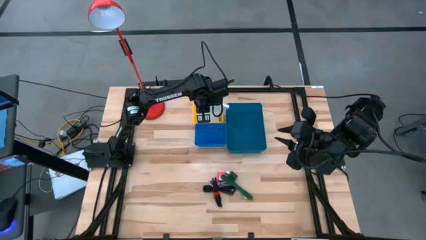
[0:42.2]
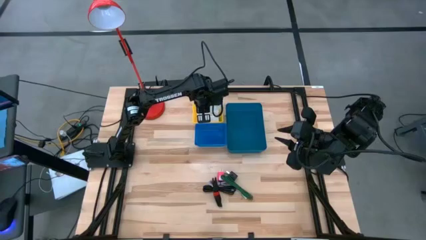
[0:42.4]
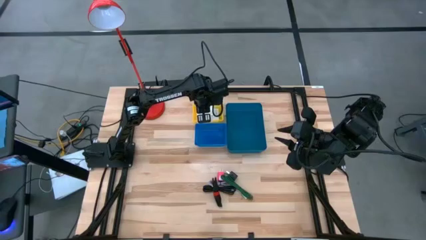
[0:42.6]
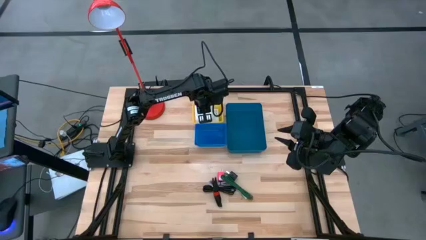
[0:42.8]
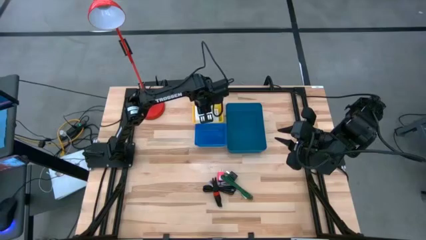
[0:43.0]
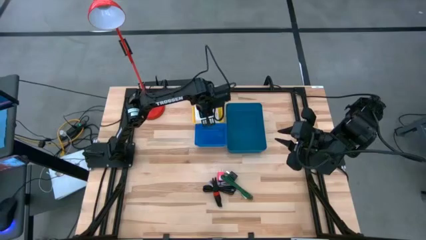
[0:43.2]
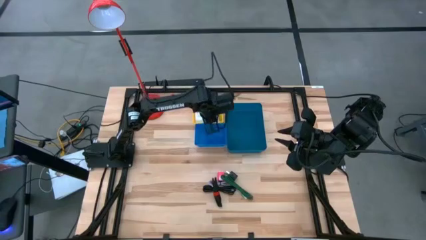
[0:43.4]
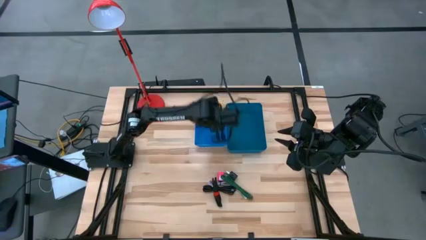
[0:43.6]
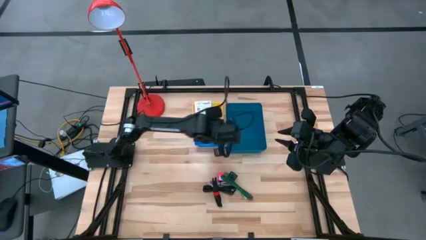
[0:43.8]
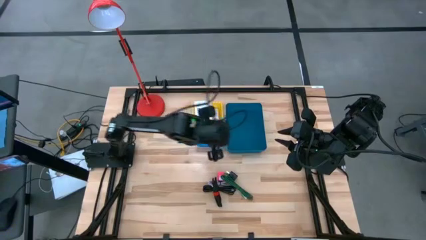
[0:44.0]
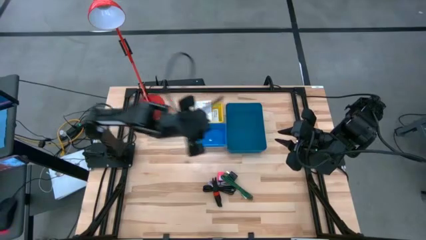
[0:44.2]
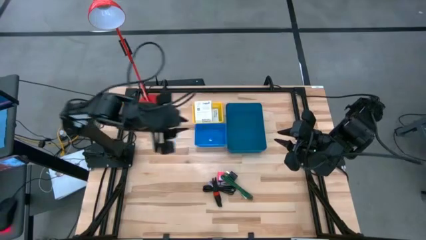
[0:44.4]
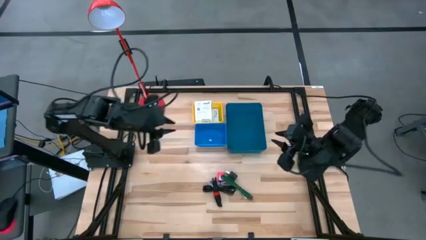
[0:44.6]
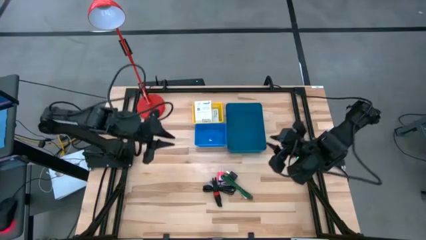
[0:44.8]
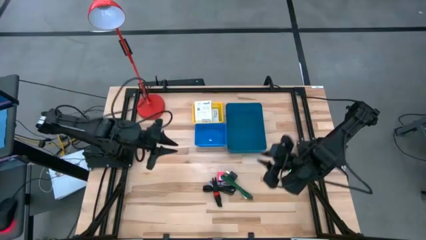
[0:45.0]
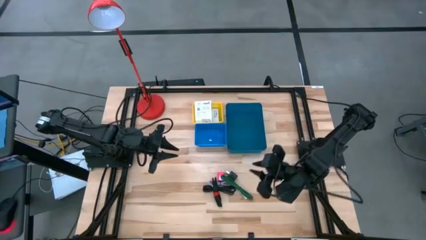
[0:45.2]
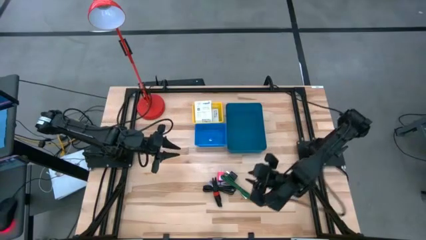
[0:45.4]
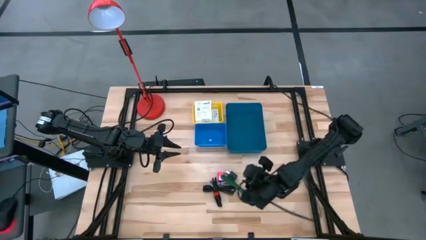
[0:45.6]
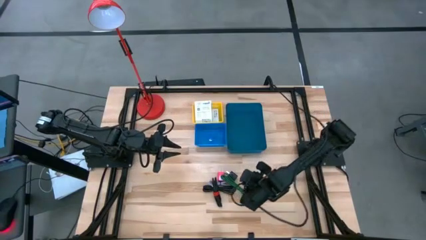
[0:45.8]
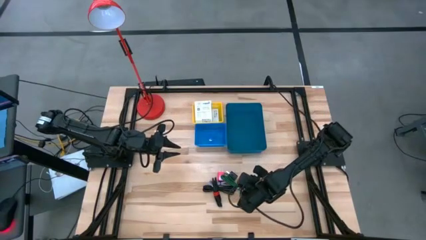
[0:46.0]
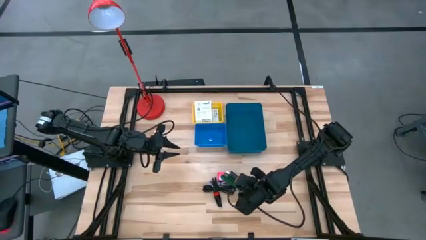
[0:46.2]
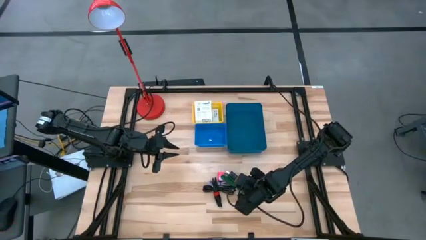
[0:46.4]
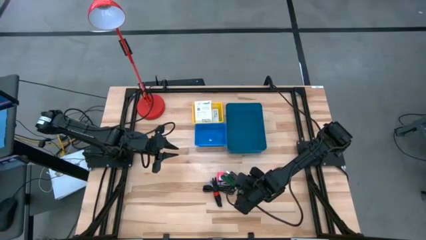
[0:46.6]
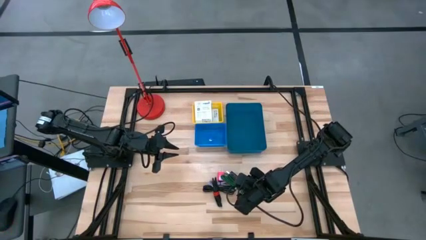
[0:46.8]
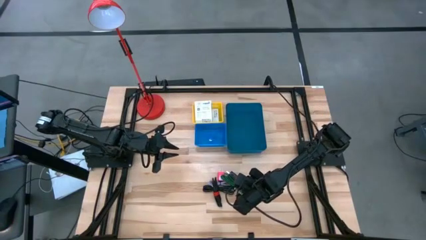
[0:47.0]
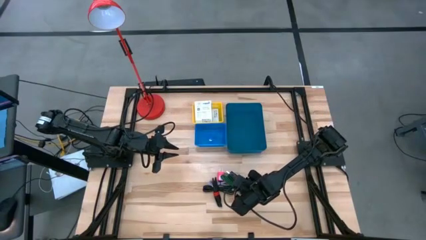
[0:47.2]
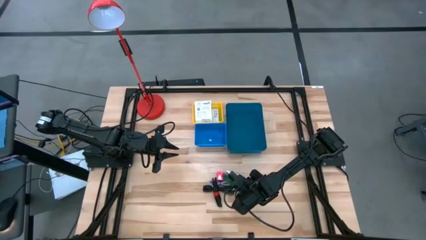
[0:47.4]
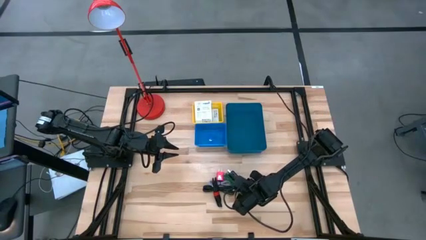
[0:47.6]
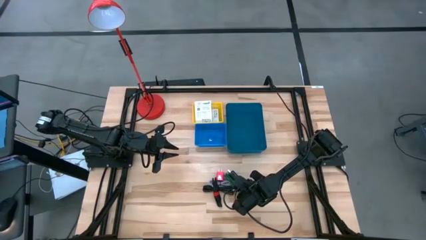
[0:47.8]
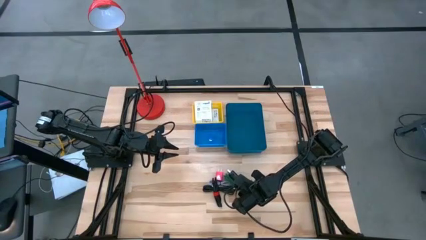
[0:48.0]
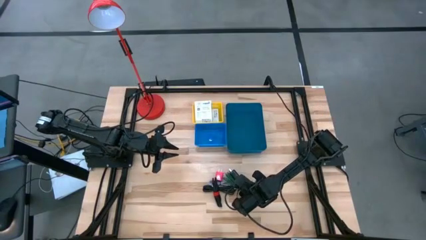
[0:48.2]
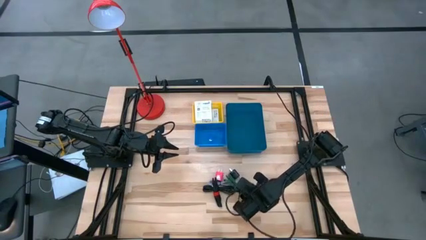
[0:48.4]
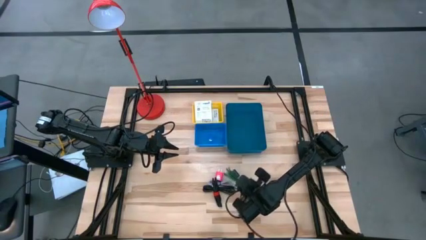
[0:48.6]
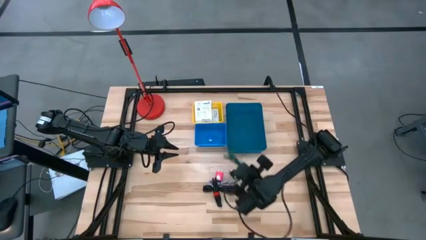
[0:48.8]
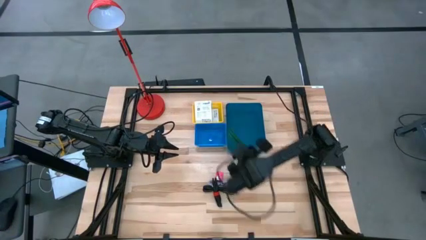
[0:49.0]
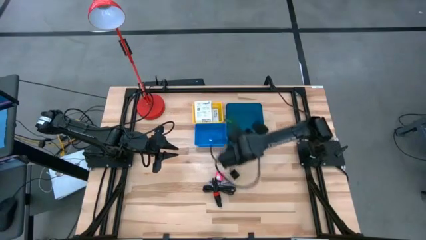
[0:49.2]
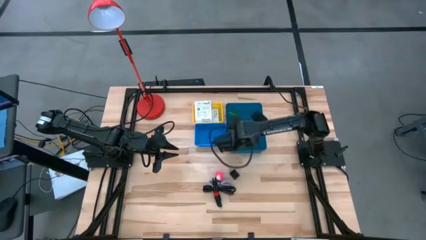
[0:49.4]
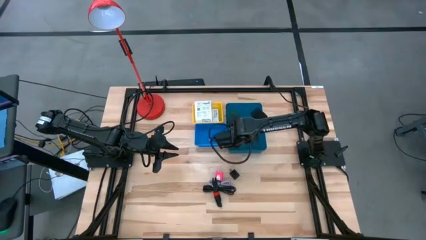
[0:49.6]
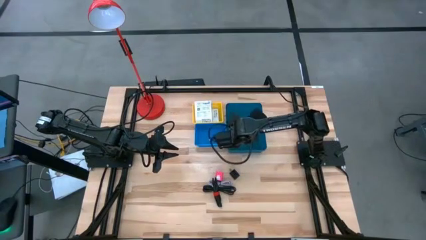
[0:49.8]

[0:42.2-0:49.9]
Task: Pick and place items into bin
Put the green charger cable into the light blue bin

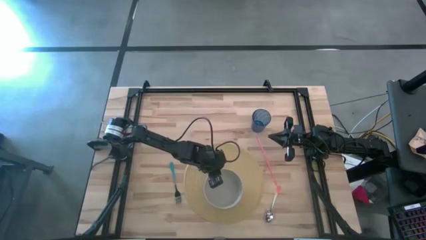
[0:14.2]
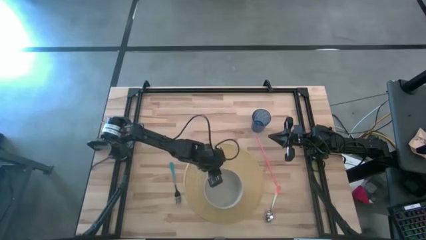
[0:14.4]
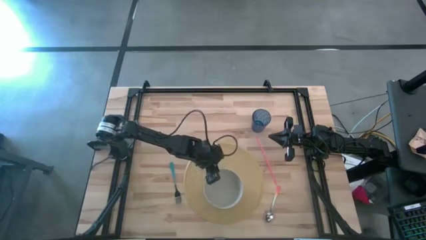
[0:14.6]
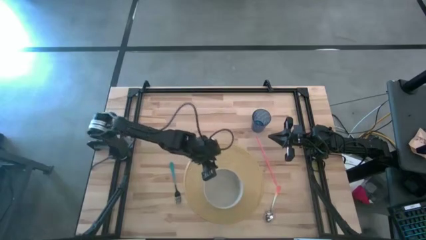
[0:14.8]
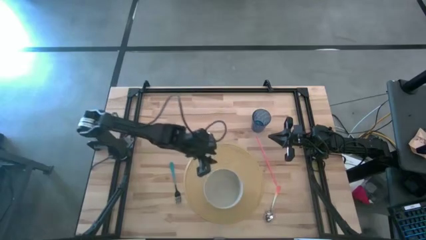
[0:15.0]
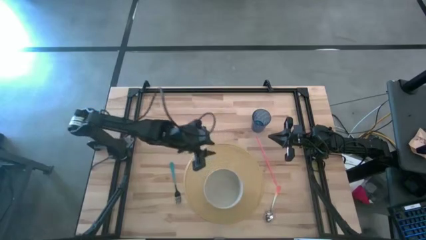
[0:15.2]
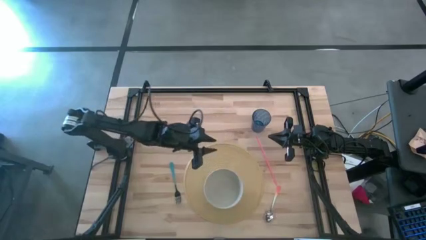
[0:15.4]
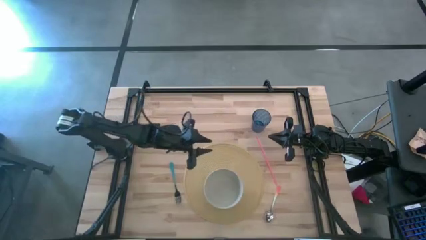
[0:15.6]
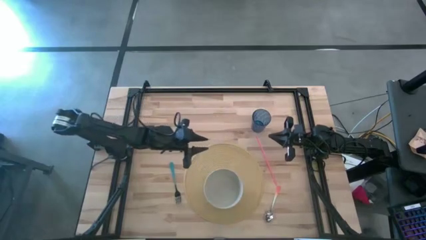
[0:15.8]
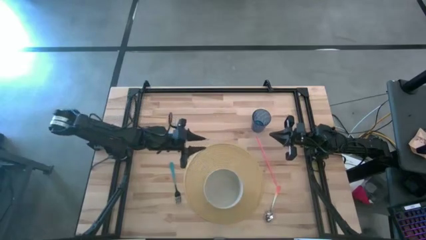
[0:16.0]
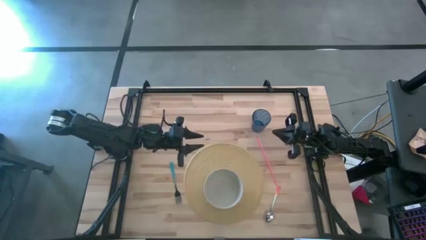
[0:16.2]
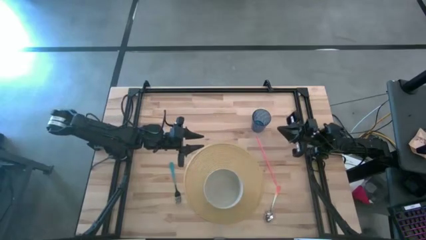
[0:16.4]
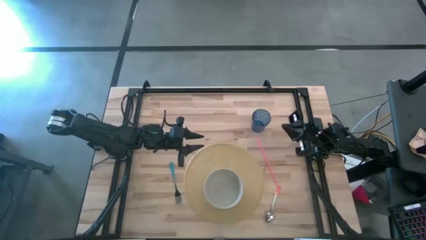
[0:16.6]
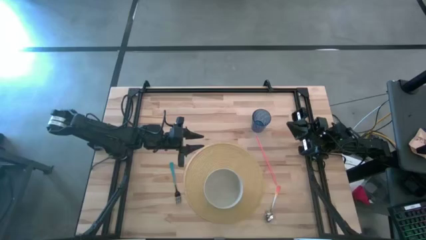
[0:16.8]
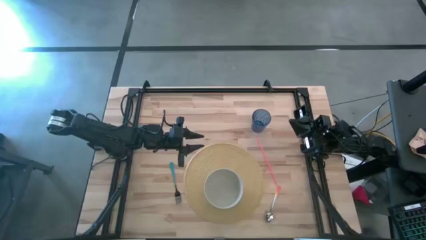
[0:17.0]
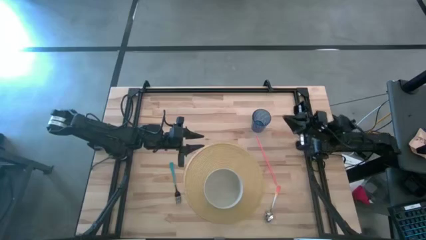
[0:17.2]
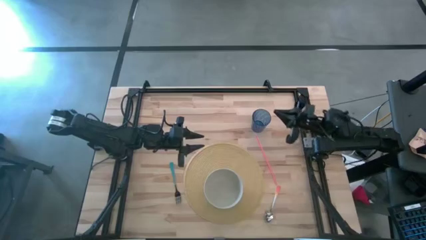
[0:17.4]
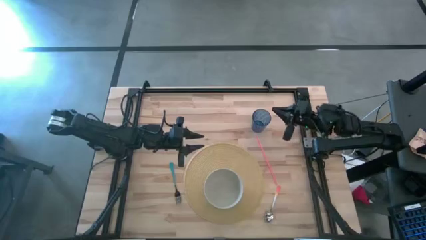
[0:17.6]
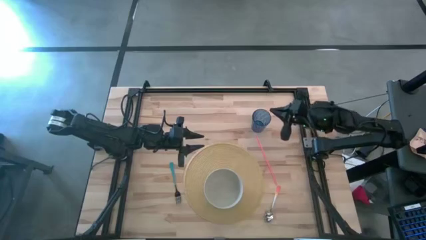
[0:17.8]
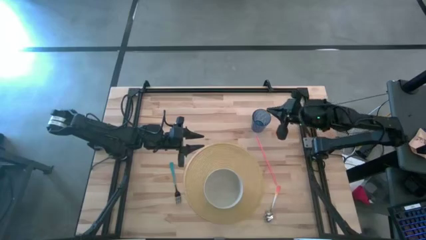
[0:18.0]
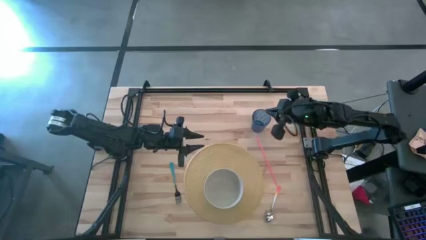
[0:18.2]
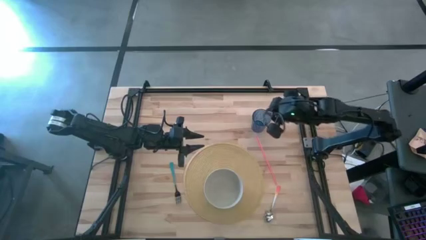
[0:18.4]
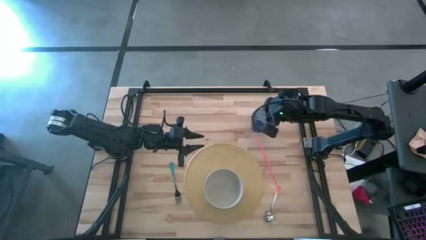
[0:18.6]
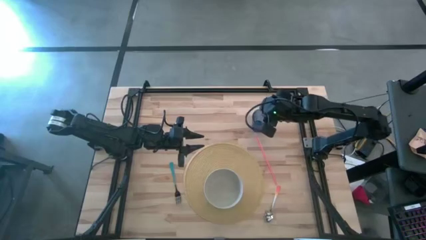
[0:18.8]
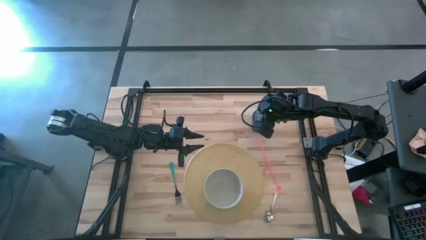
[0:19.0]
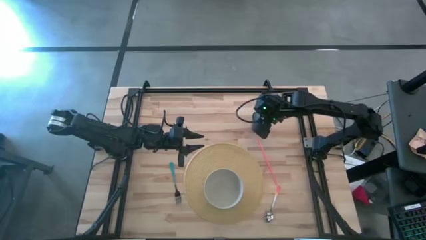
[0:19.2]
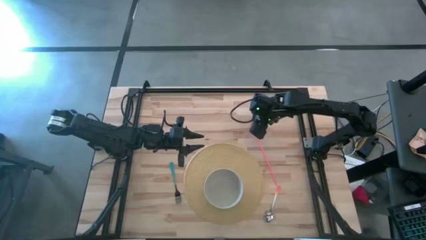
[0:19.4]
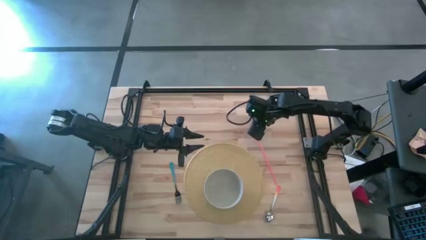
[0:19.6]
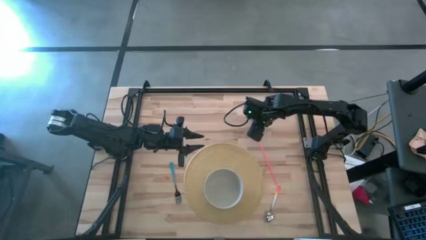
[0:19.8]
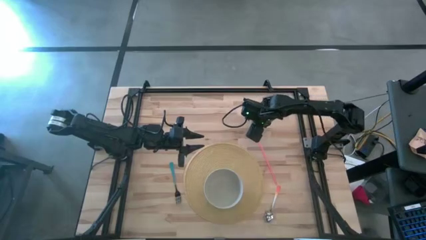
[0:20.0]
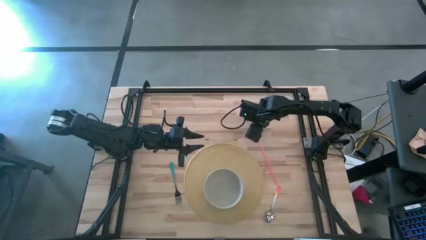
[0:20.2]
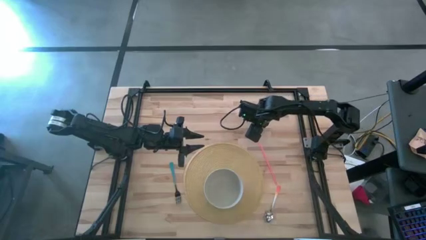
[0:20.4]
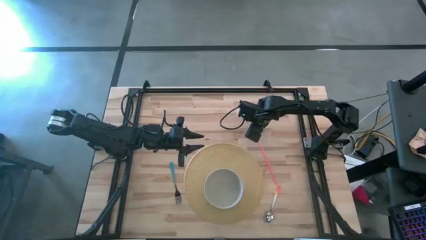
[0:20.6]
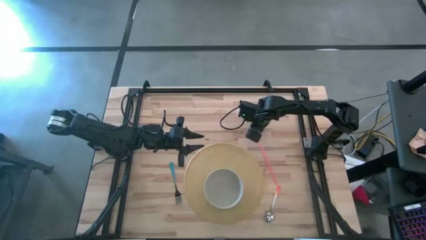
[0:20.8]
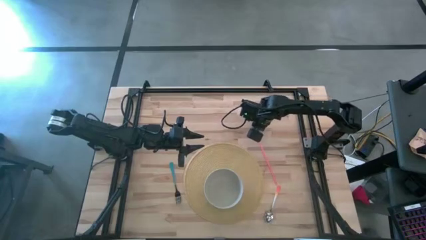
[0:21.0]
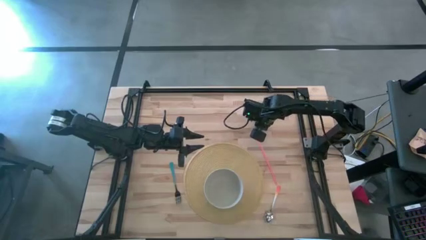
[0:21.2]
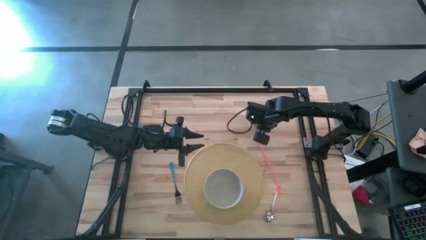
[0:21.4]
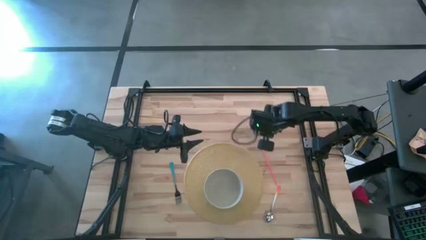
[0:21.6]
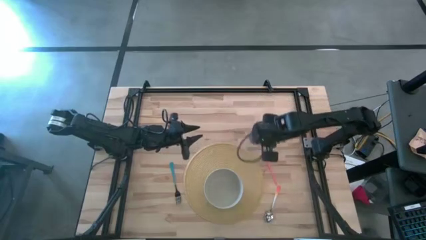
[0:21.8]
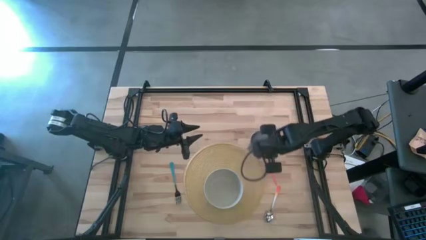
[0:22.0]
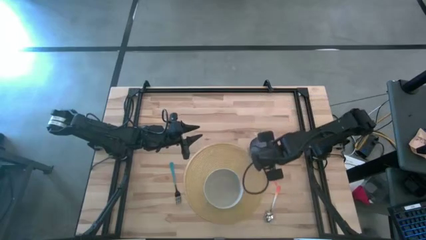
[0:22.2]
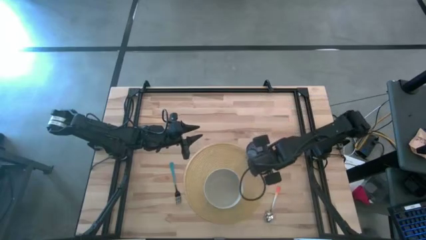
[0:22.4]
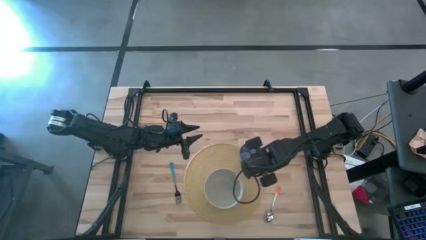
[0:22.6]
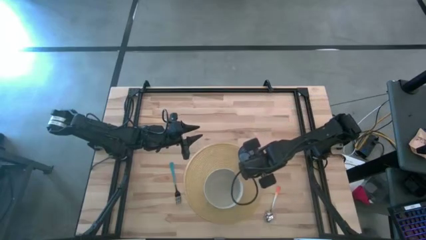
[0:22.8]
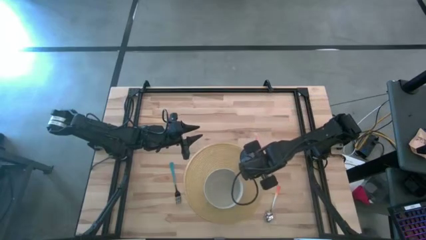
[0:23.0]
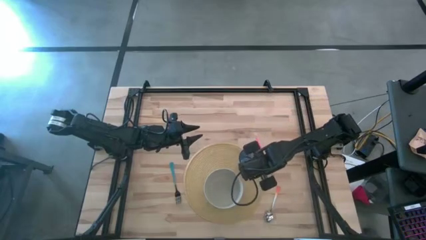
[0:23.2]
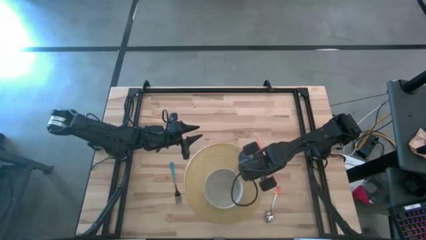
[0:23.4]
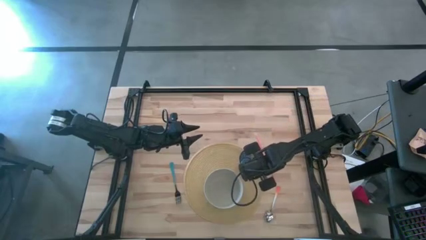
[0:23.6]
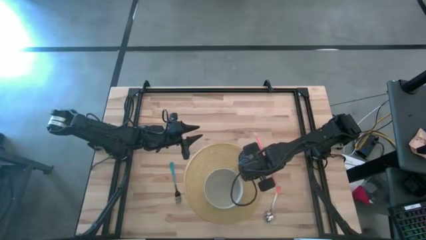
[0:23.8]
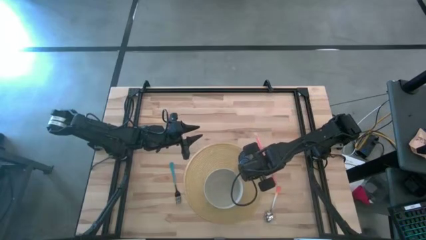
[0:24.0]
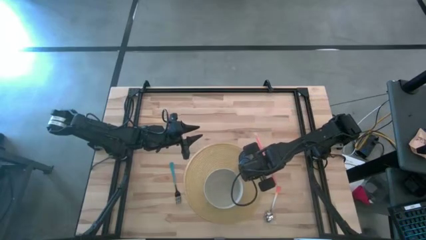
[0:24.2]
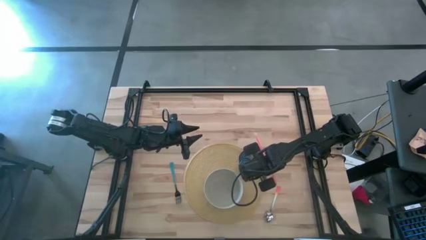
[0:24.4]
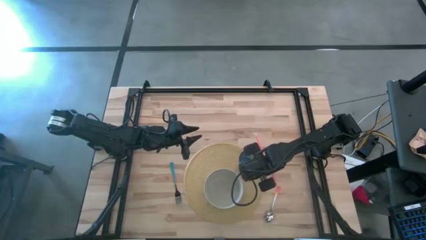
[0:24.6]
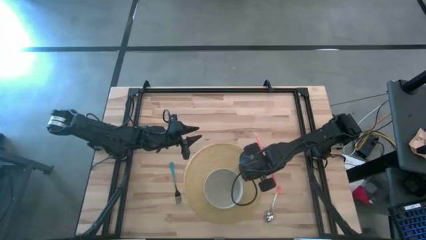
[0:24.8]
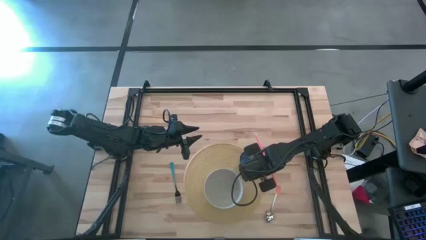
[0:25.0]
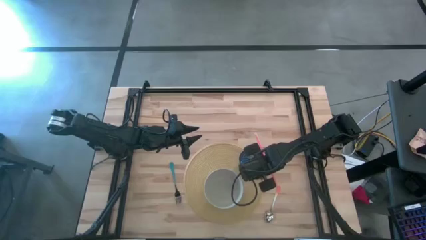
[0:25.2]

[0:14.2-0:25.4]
Task: Pick & Place Utensil
Put the blue cup on the top right of the brown mat
